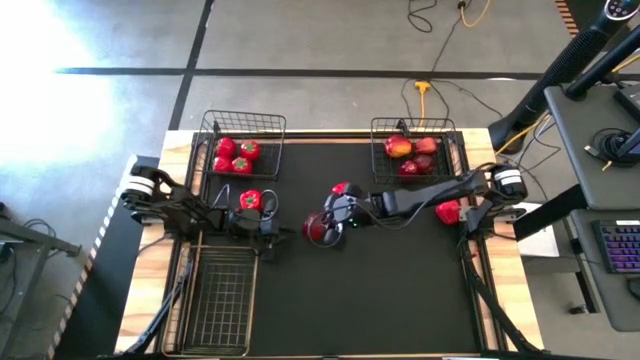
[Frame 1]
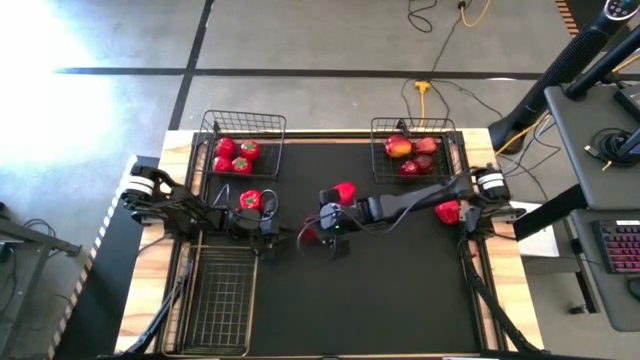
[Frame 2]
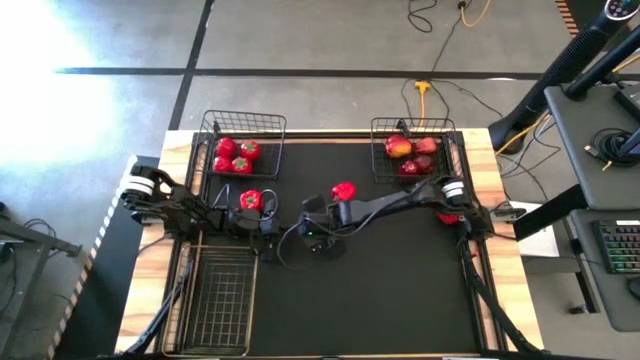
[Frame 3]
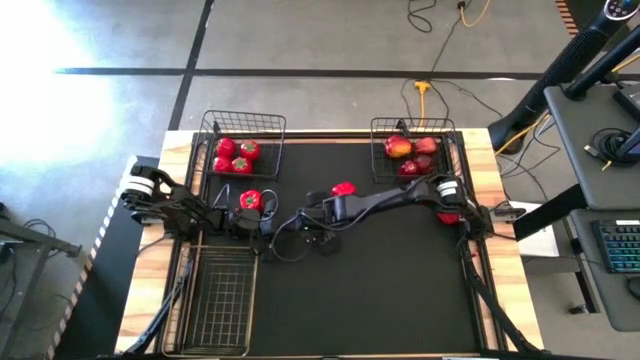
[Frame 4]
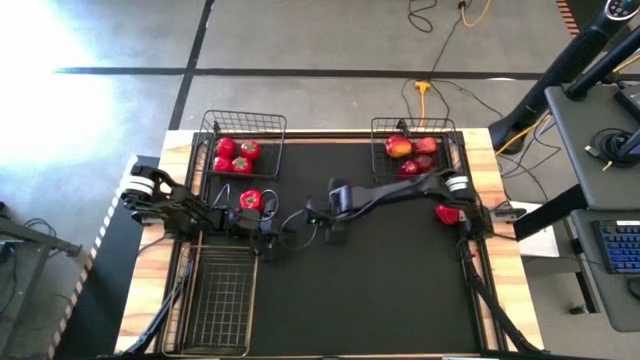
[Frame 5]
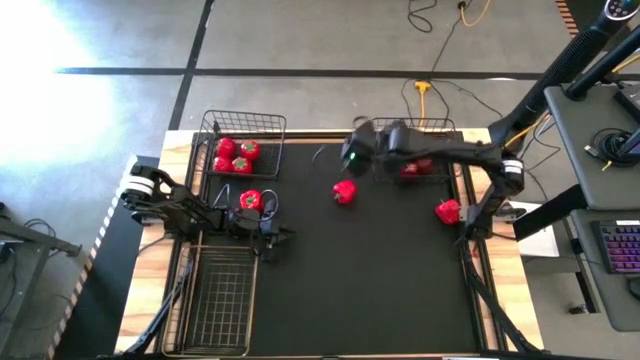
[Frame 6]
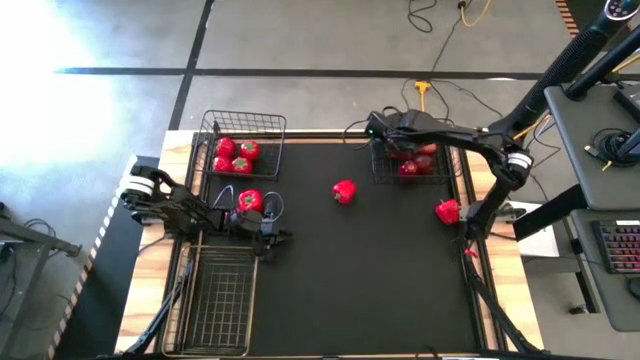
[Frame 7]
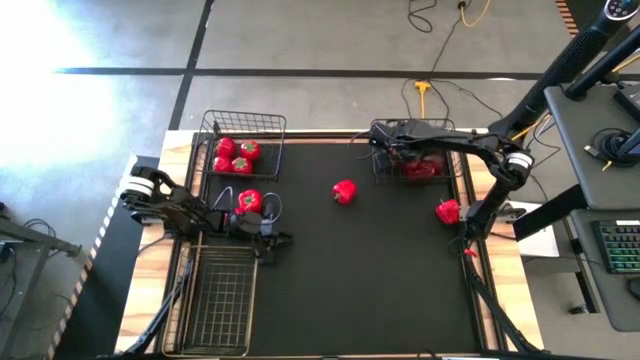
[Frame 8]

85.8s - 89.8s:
Task: Sort produce into baskets
Put the apple into the right black wire basket

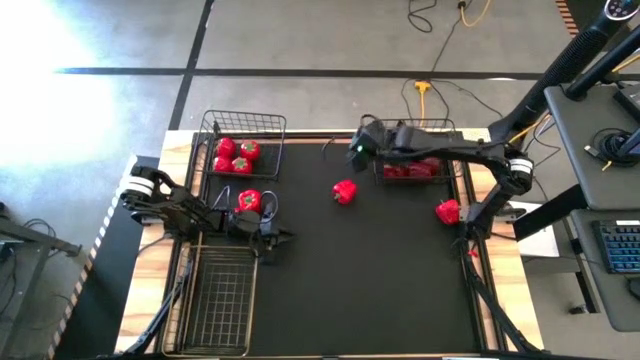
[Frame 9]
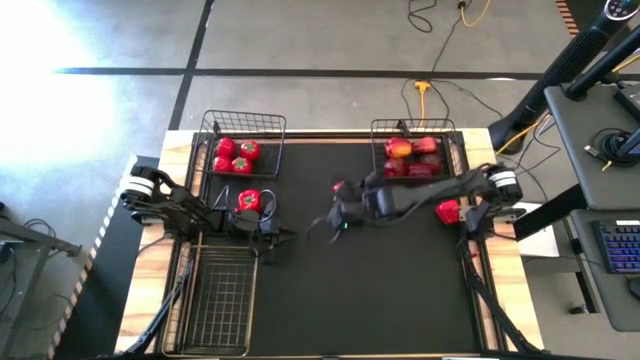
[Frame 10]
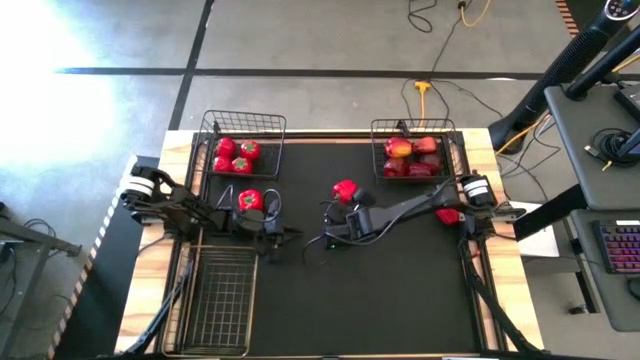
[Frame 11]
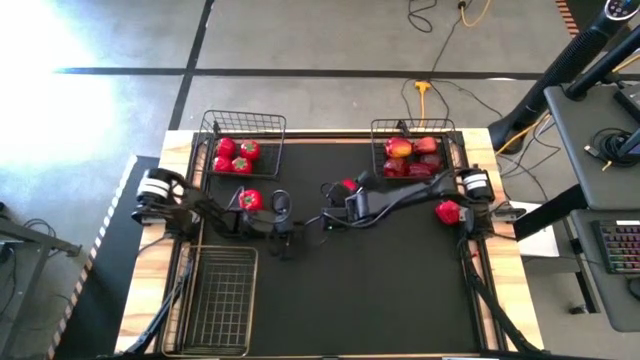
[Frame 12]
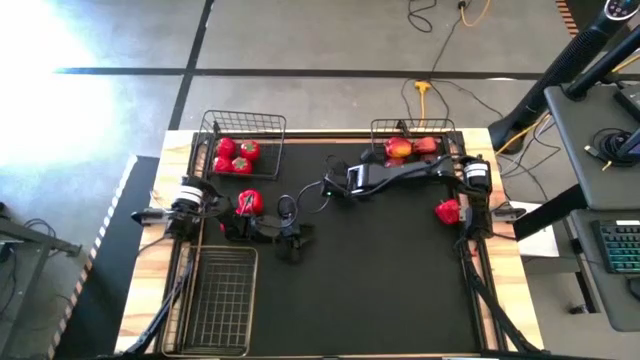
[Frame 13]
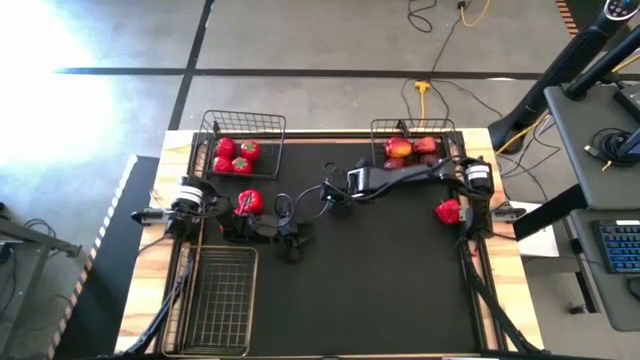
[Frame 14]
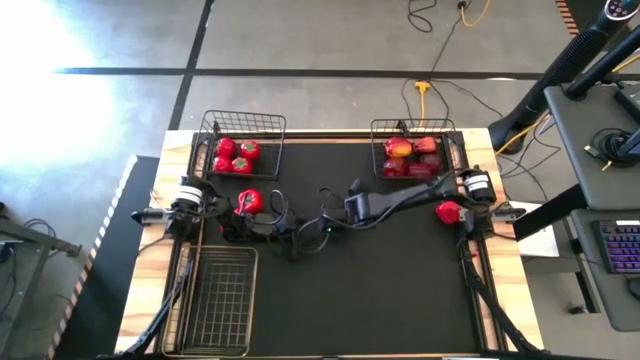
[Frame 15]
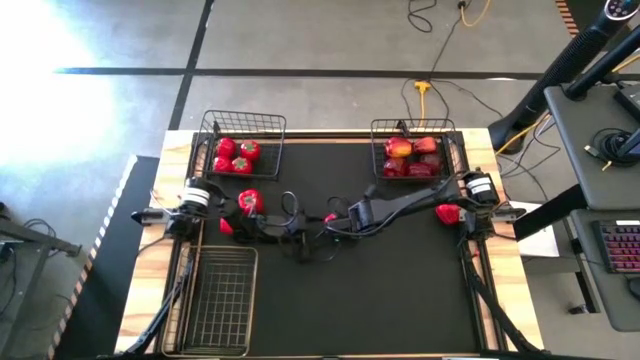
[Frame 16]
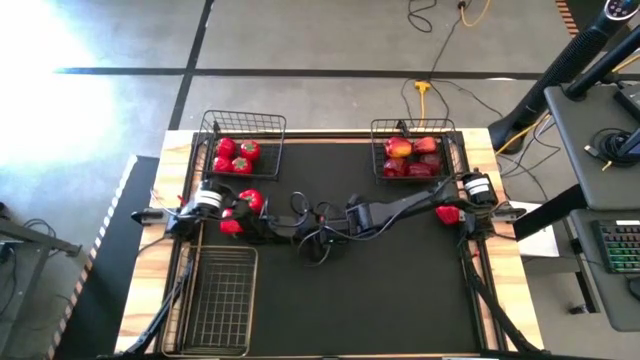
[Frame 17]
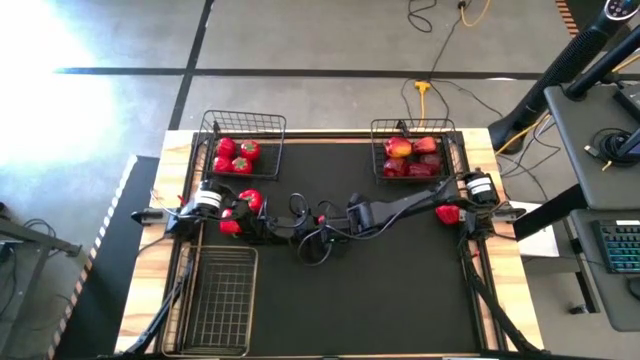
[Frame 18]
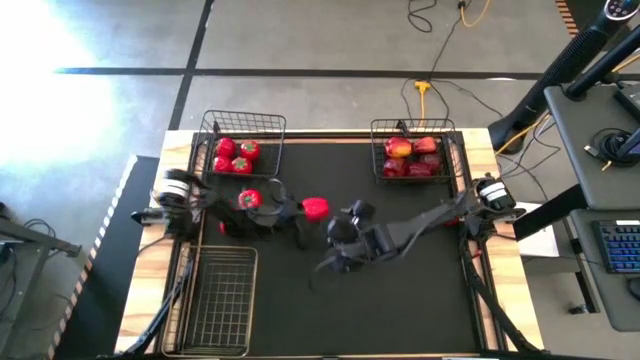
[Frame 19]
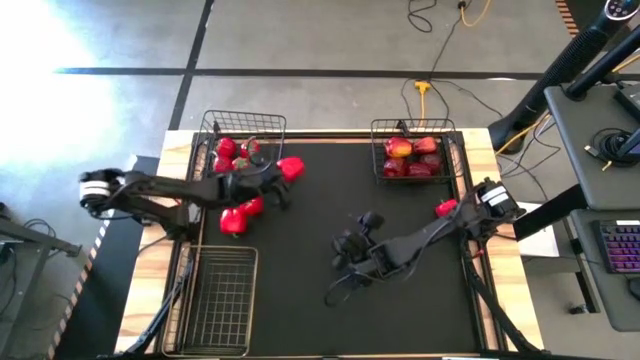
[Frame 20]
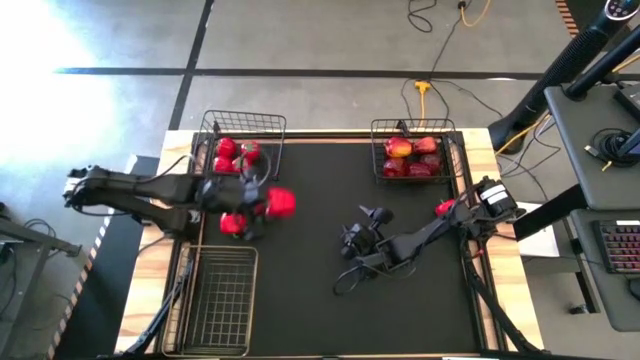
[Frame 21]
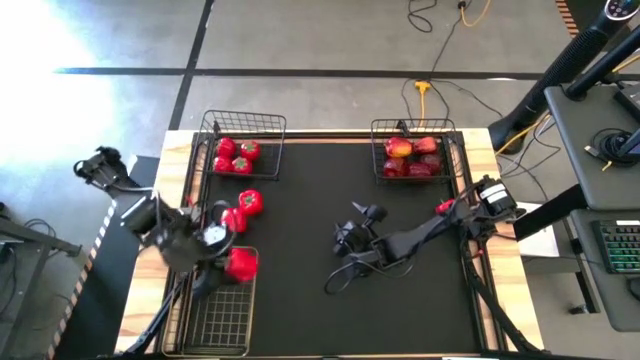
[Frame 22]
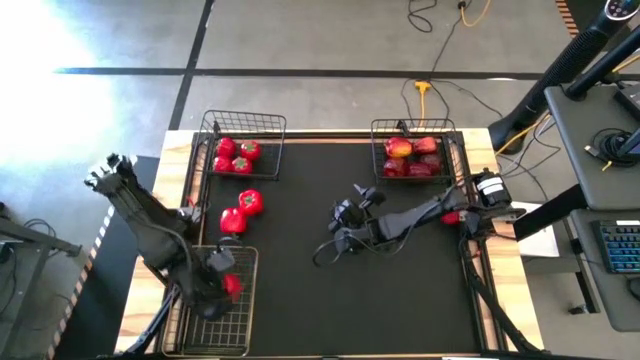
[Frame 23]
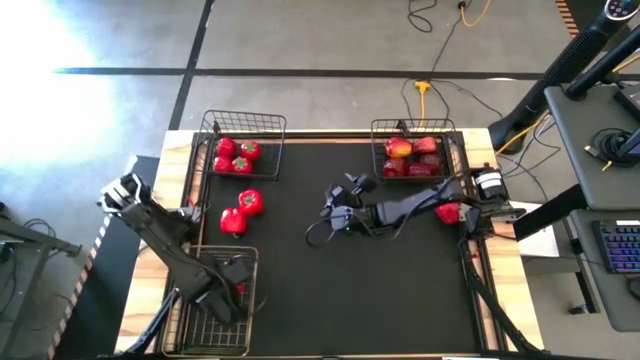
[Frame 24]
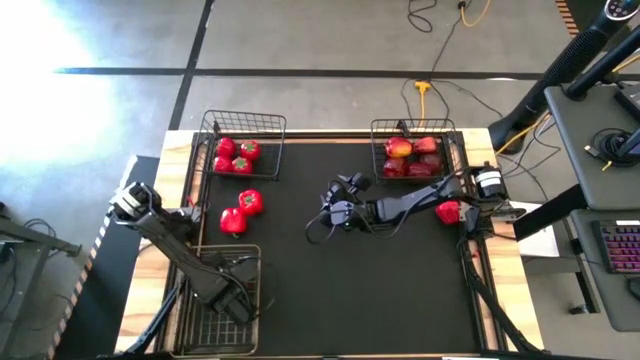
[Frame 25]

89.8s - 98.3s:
Put the bell pepper into the gold wire basket

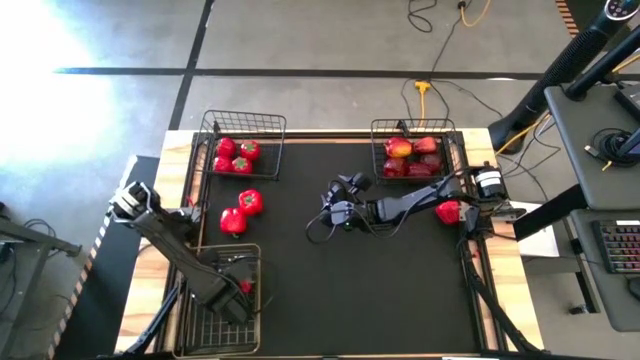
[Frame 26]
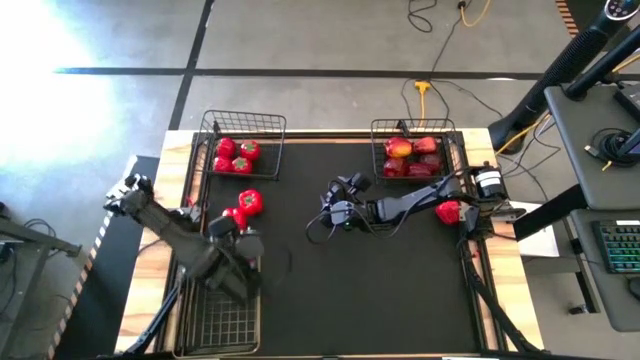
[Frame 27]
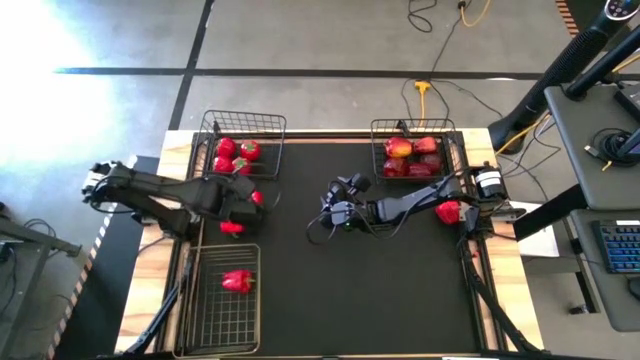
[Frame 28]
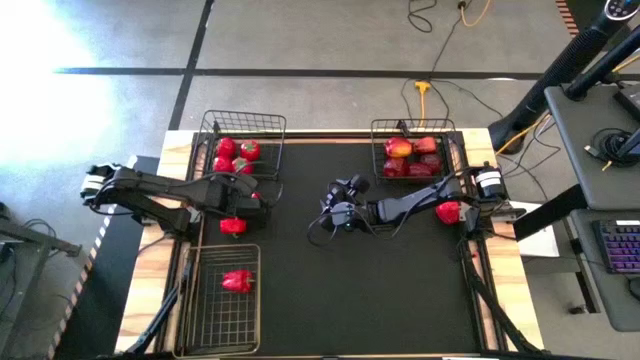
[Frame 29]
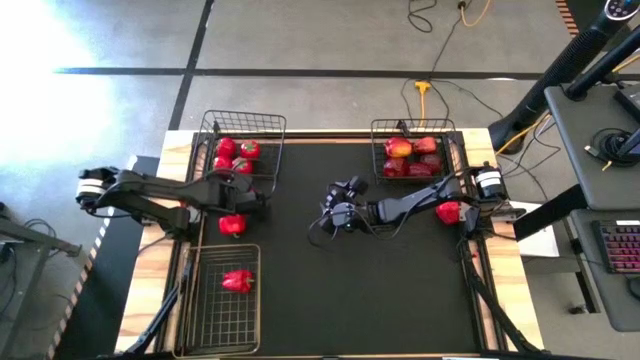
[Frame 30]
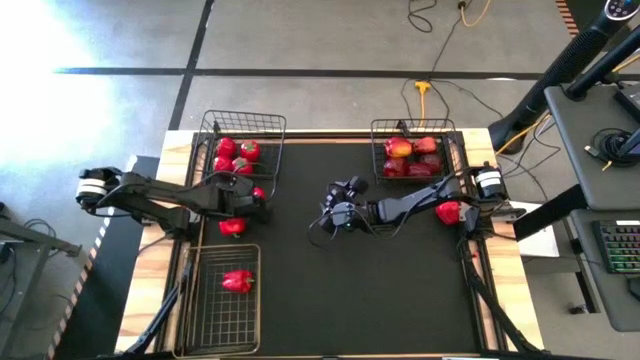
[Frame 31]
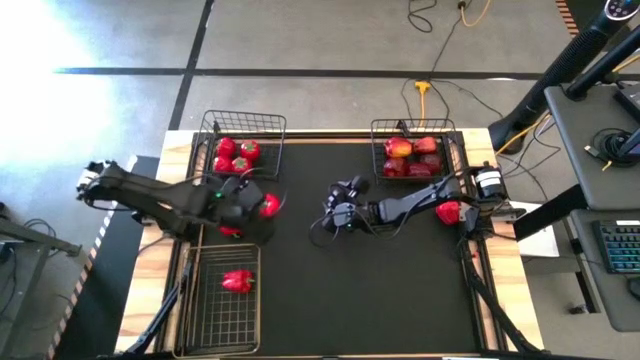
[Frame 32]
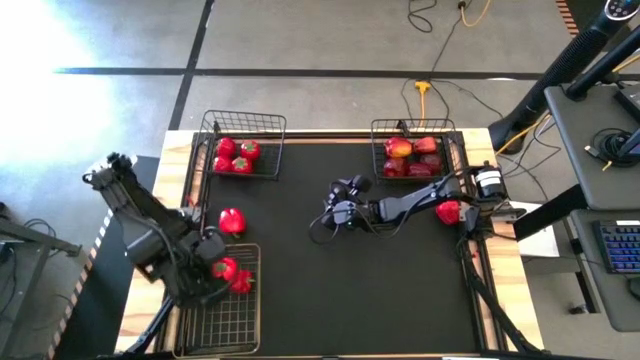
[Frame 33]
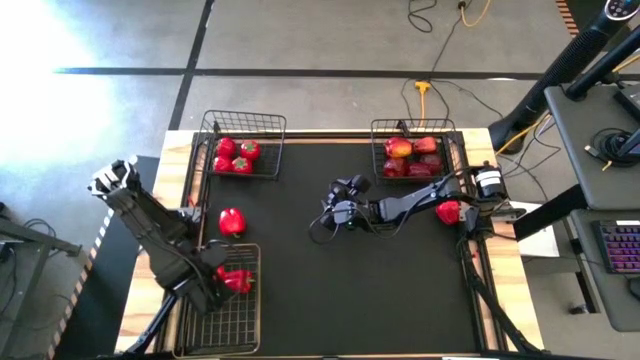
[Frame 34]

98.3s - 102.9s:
Put the bell pepper into the gold wire basket

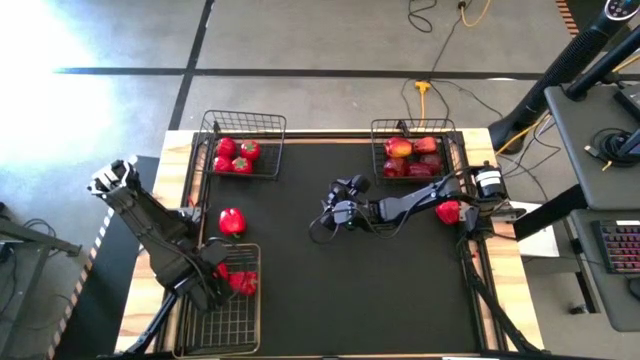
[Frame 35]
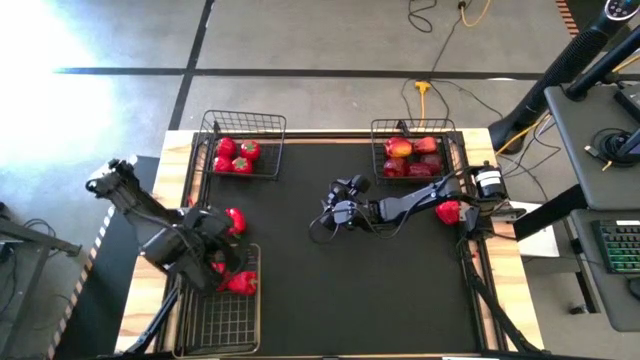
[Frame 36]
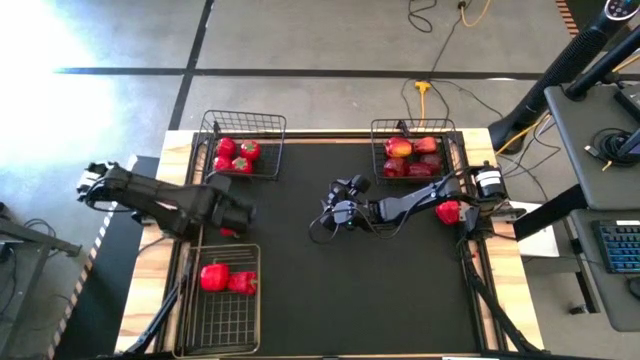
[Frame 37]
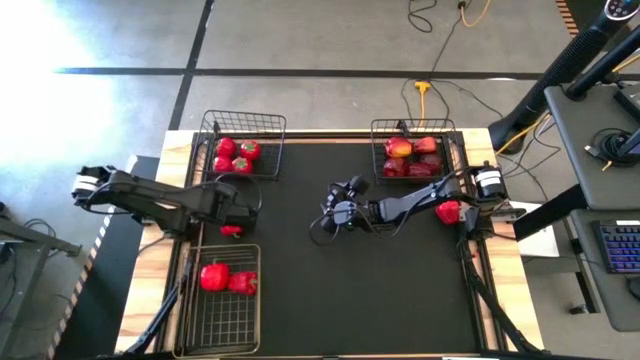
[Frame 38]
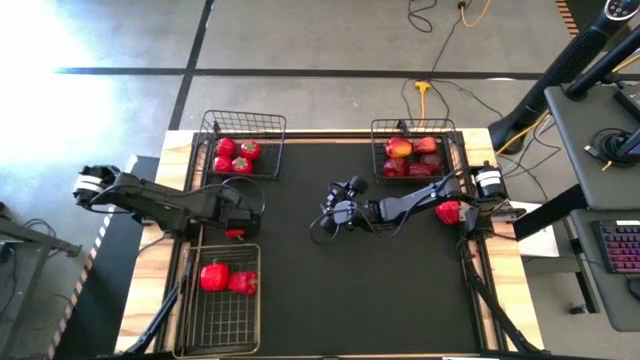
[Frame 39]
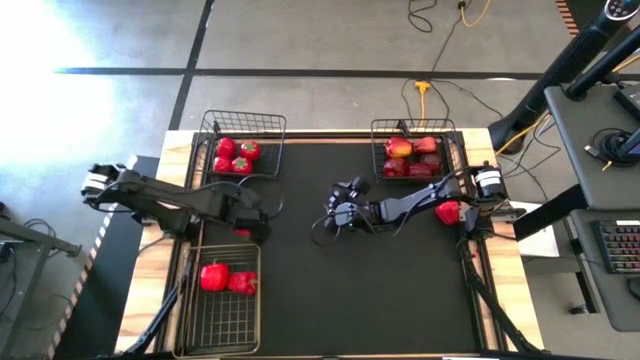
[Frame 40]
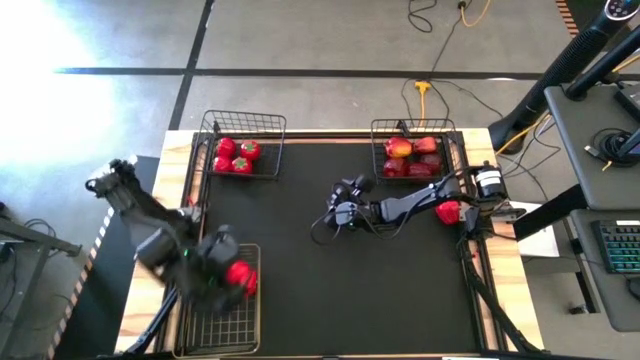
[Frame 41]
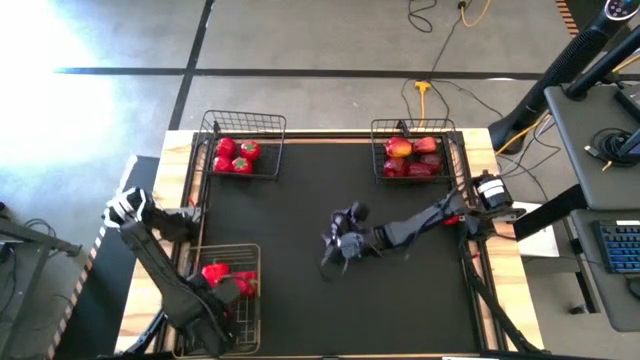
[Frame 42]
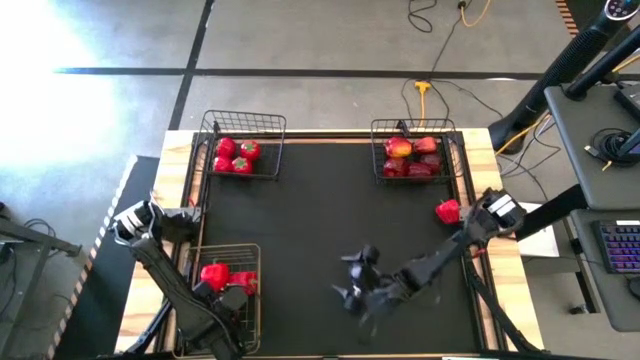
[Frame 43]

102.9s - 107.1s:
Put the bell pepper into the gold wire basket
